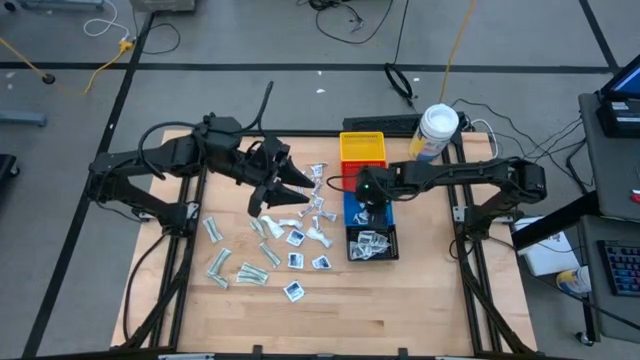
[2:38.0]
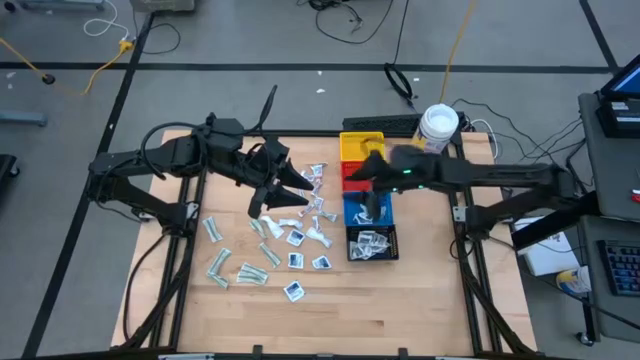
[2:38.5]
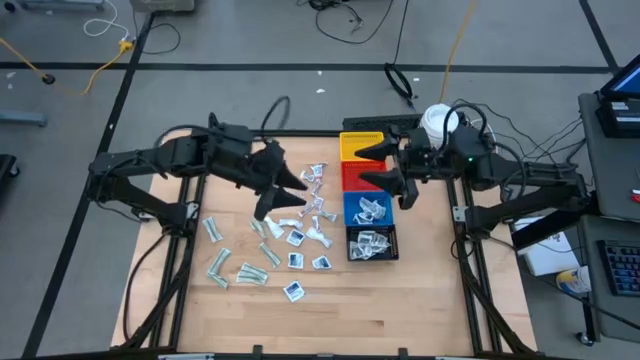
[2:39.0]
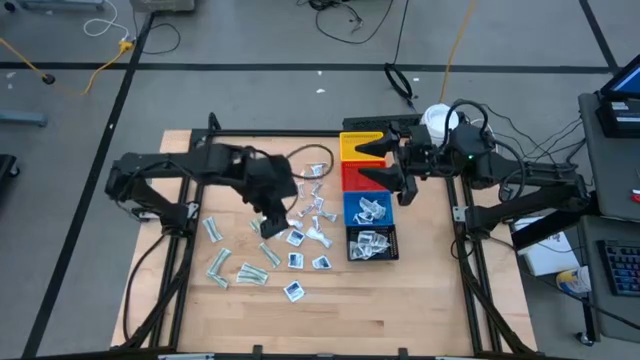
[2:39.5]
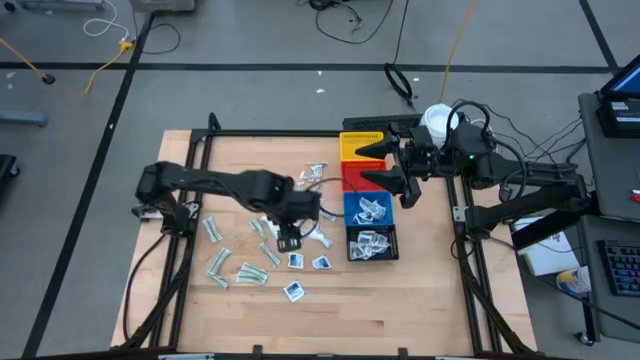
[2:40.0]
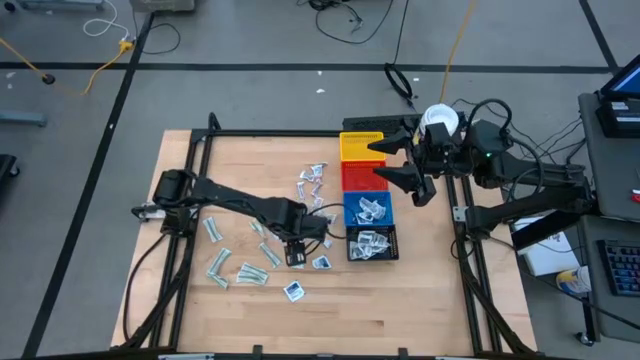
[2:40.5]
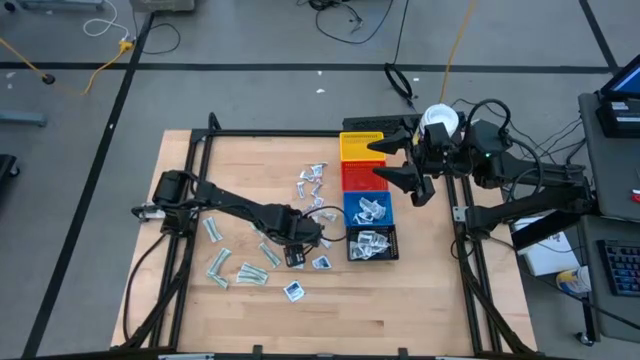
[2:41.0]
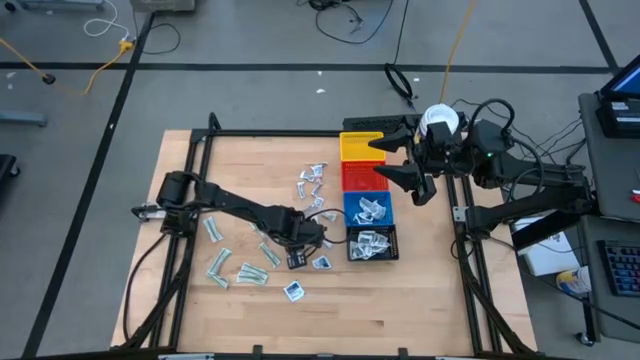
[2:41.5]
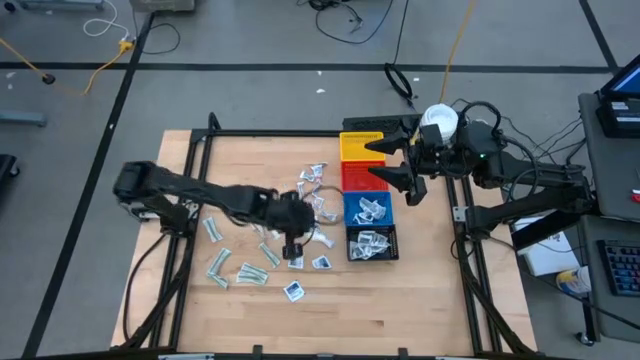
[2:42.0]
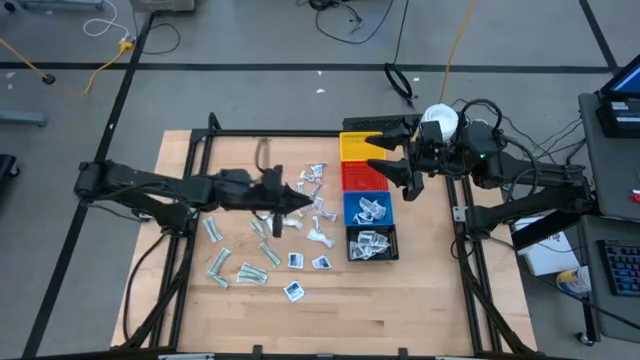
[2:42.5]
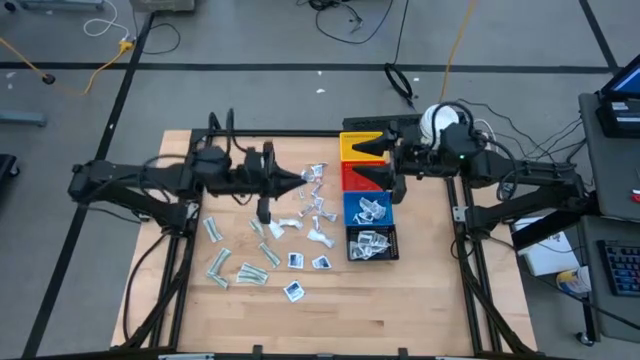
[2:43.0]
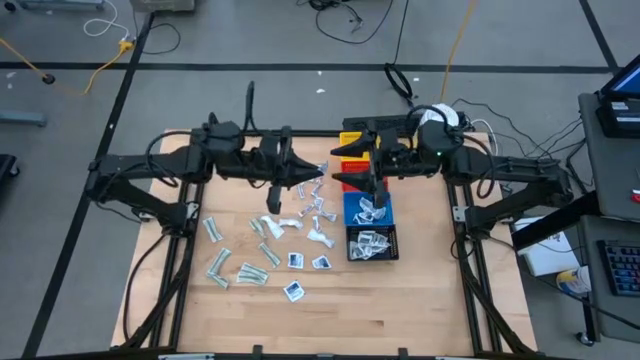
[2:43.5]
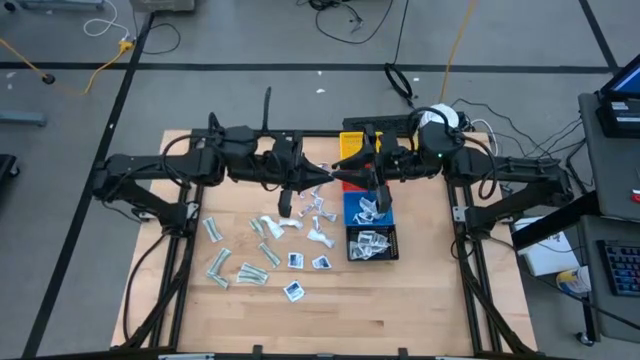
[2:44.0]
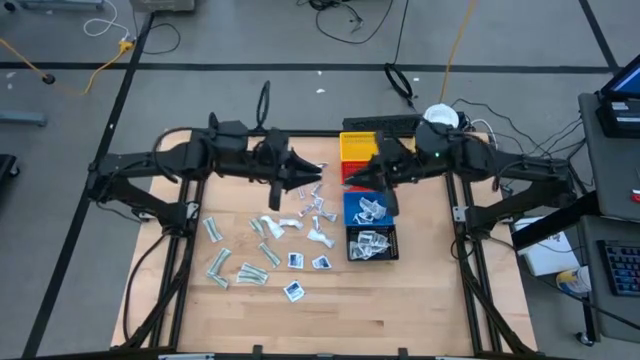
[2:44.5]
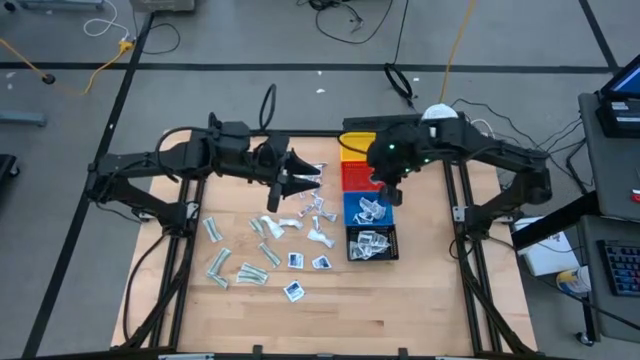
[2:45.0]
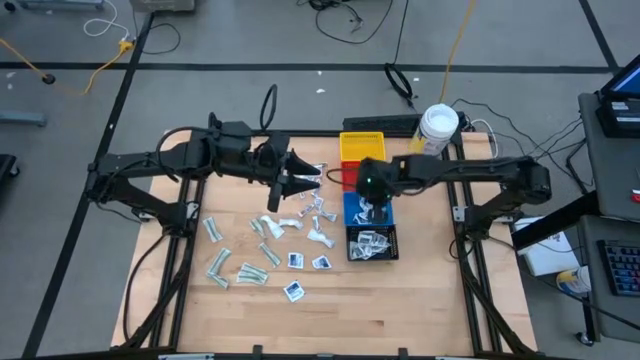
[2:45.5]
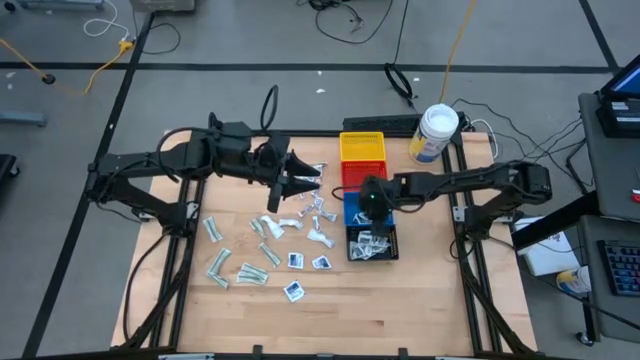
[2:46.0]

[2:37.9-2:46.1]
Task: Pick & Place First Aid Supplies
Put the blue alcohol pad into the blue bin

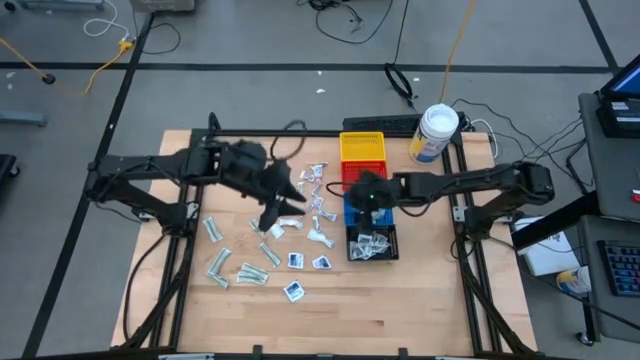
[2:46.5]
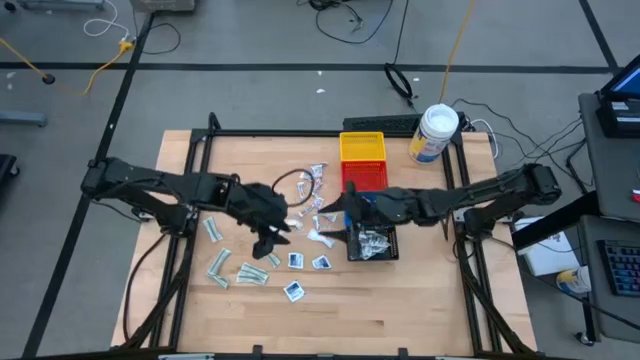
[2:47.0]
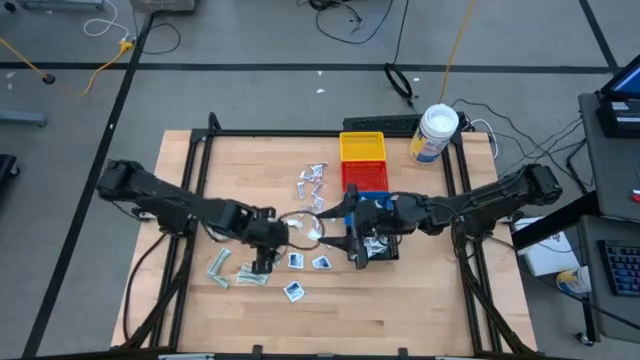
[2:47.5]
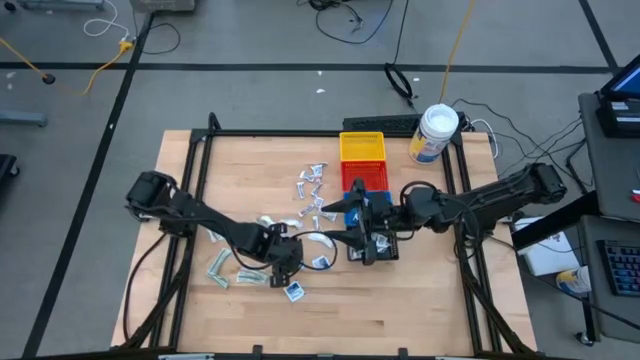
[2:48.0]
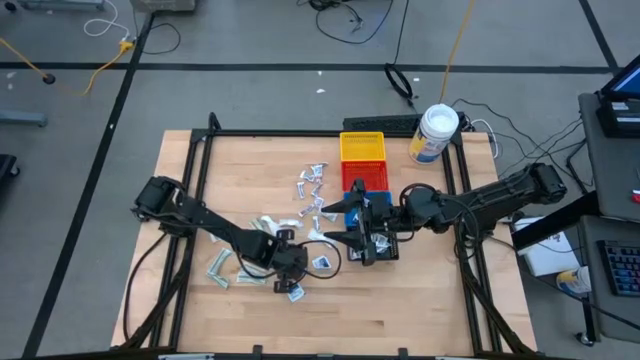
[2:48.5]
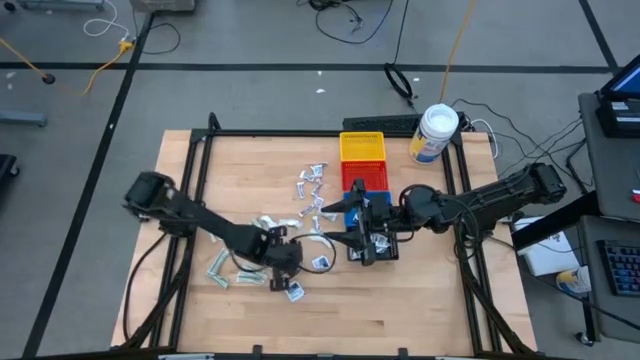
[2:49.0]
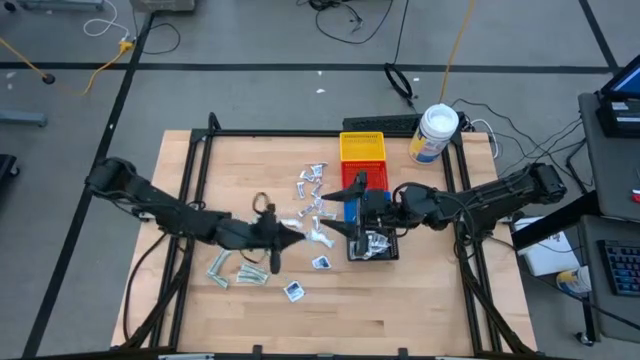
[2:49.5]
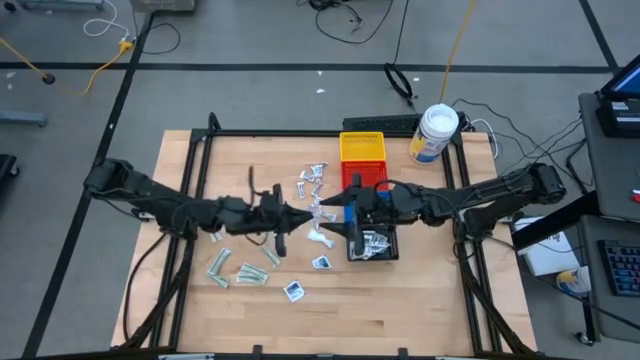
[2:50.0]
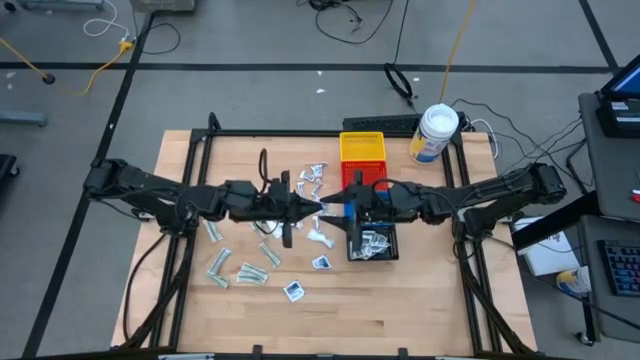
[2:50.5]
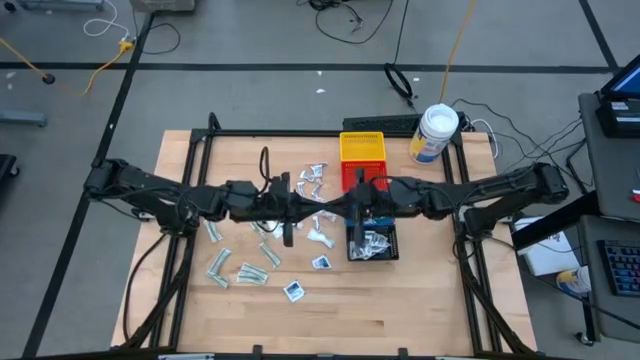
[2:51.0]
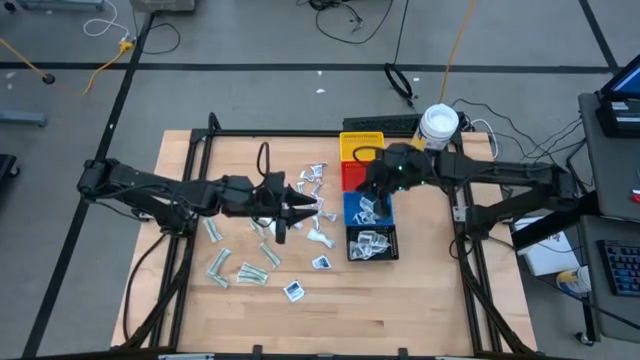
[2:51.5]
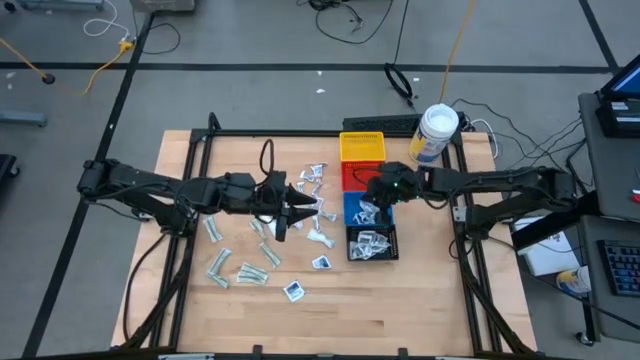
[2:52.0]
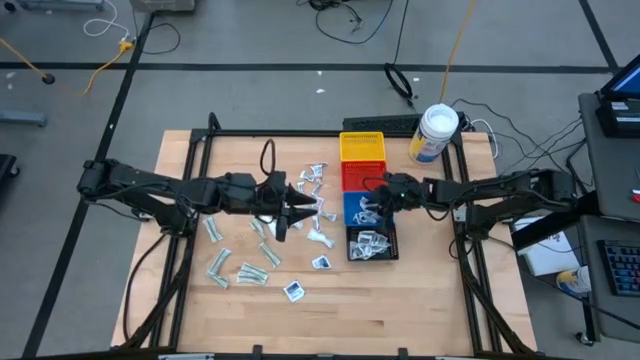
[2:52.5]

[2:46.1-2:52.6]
Put the blue alcohol pad into the blue bin

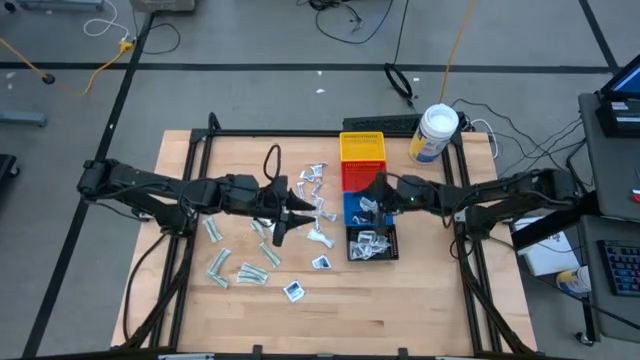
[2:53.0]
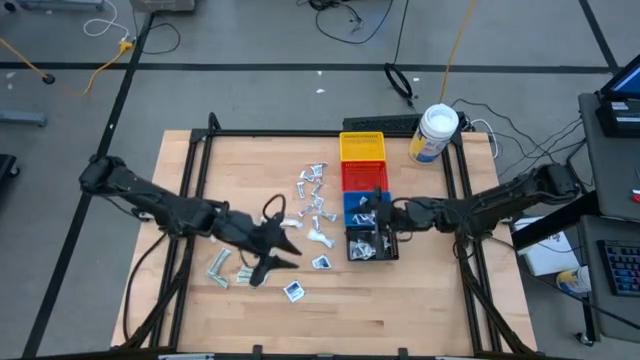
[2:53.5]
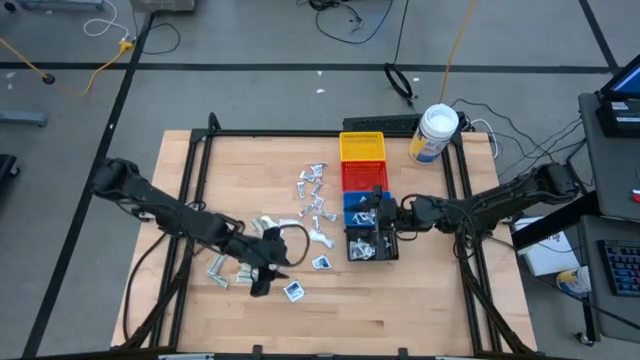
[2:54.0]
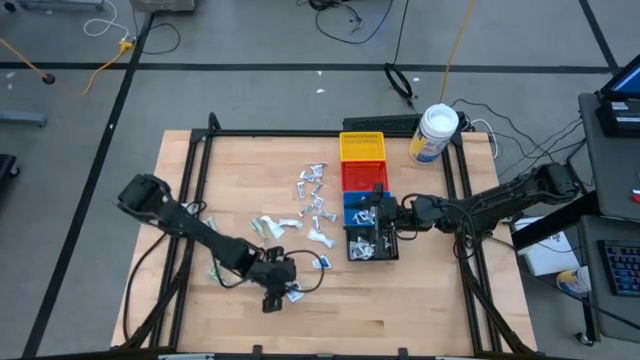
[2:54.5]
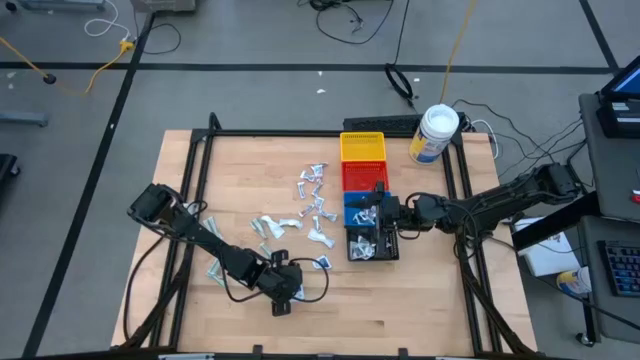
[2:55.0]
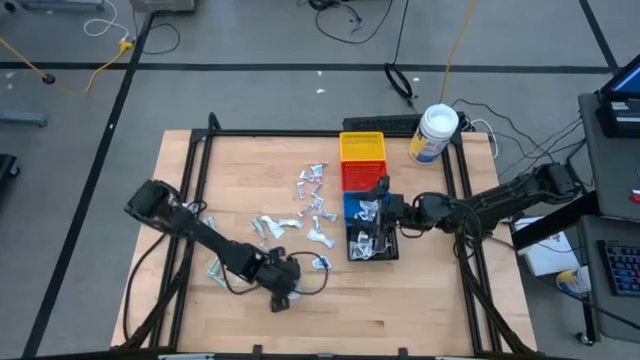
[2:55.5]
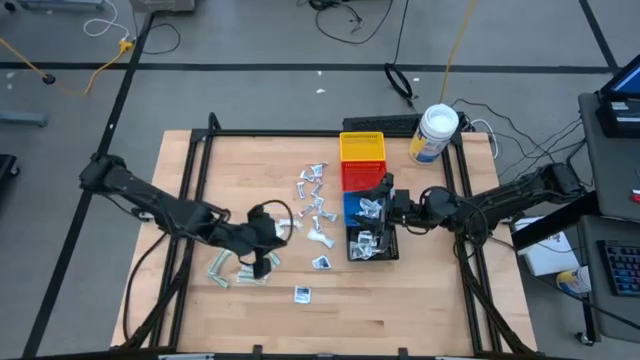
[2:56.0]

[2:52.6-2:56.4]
Put the blue alcohol pad into the blue bin

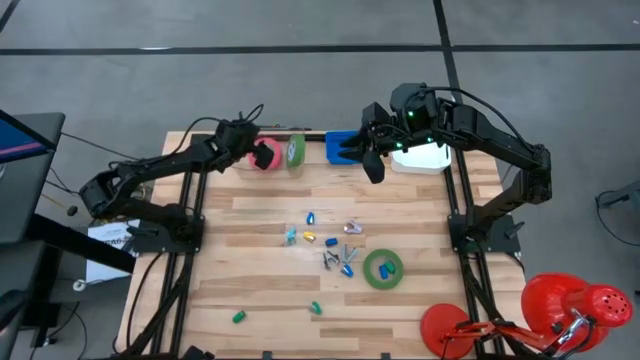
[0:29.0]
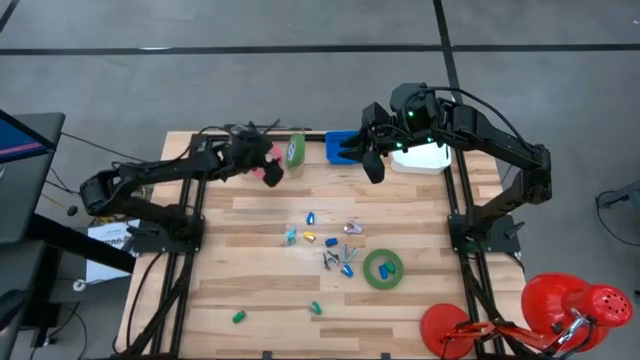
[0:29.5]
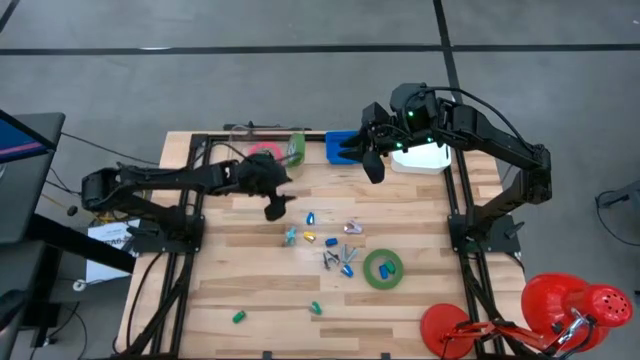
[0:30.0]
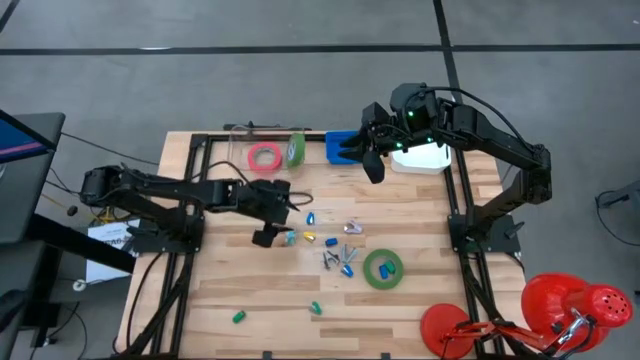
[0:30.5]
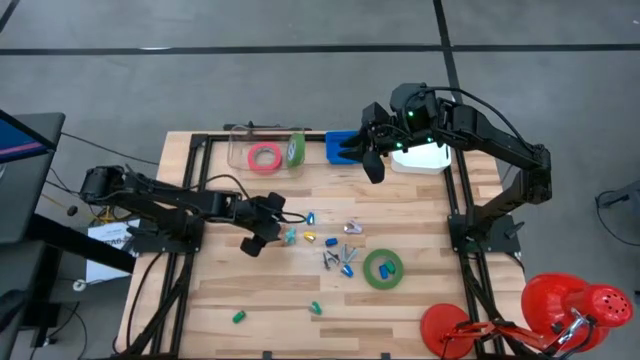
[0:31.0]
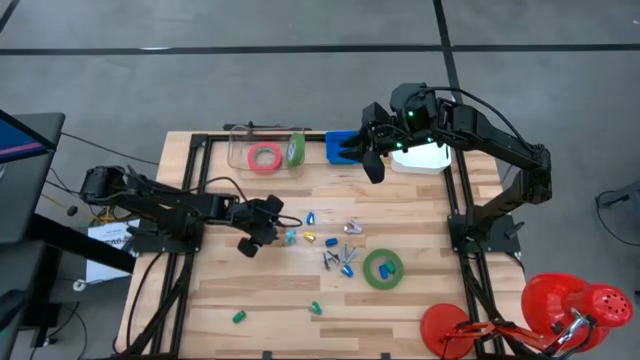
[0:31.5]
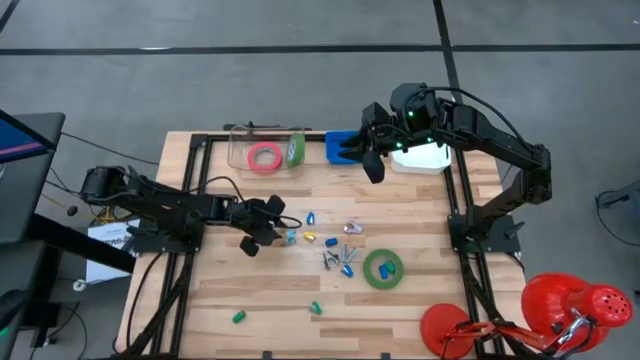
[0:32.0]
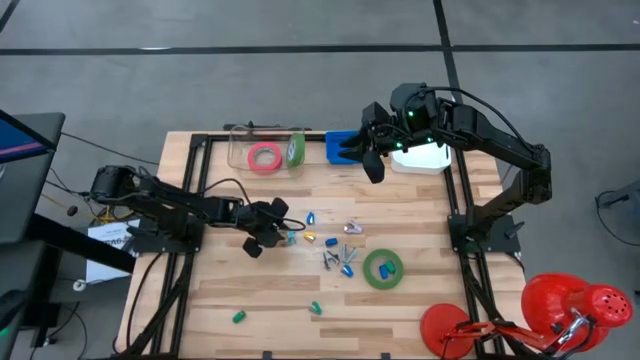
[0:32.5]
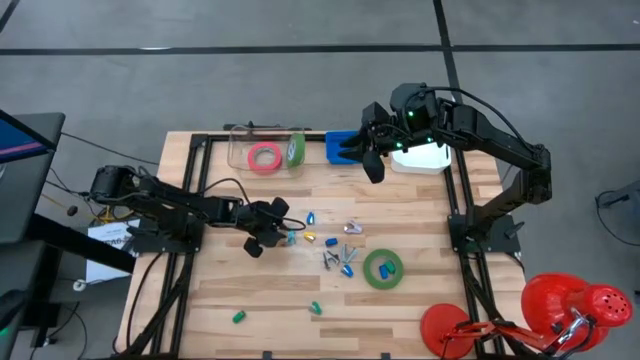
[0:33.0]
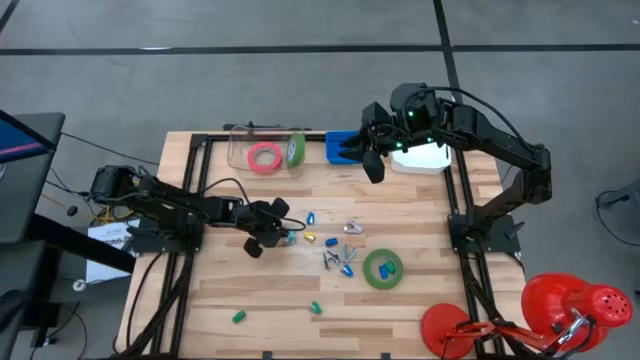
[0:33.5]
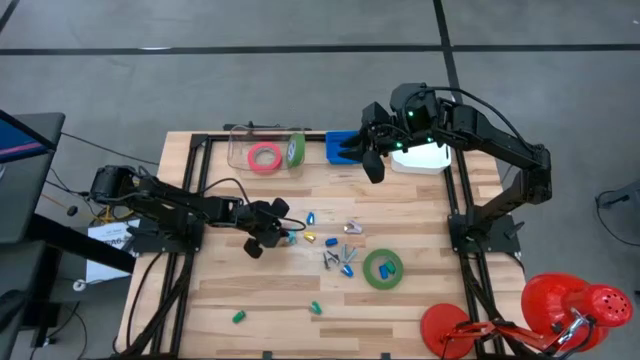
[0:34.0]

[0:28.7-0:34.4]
Task: Pick and place Stapler, Stapler remover, tape
Put the light blue staple remover into the white bin
